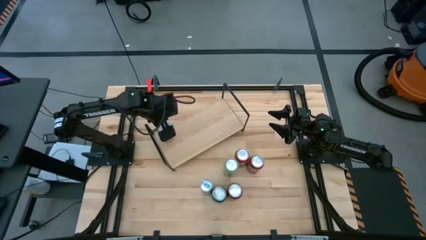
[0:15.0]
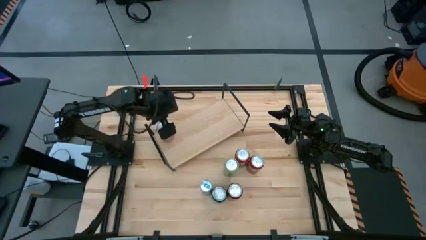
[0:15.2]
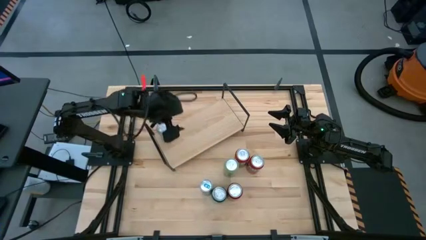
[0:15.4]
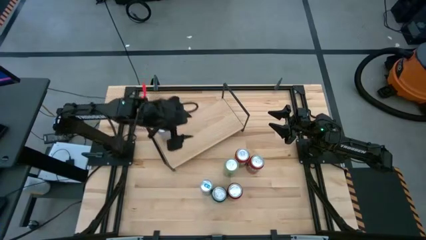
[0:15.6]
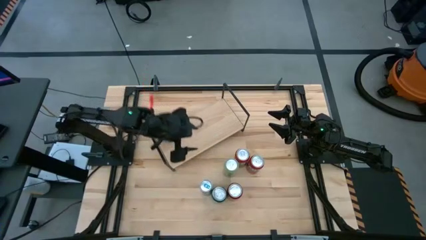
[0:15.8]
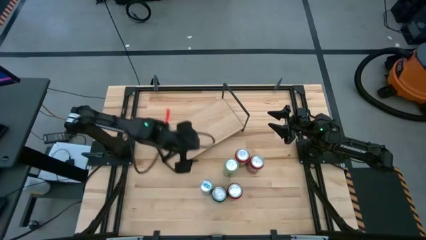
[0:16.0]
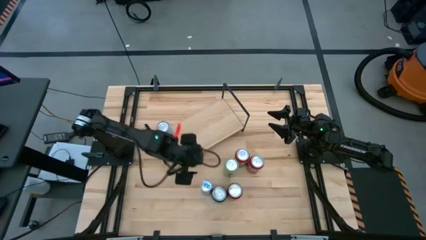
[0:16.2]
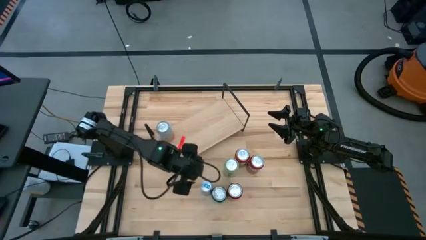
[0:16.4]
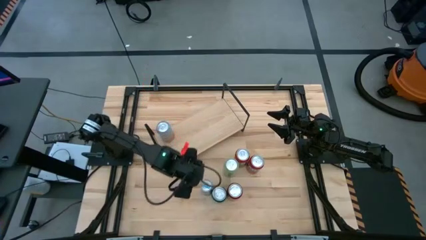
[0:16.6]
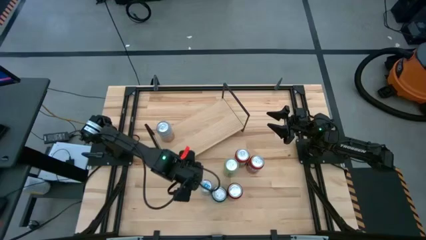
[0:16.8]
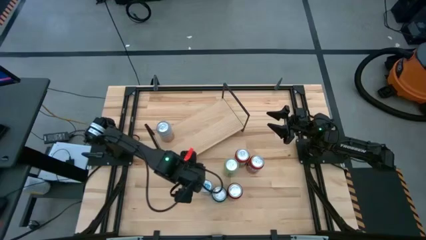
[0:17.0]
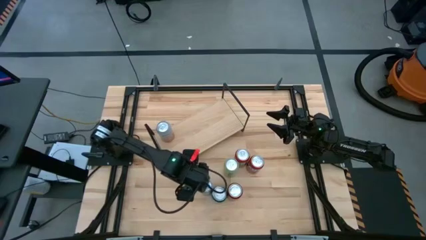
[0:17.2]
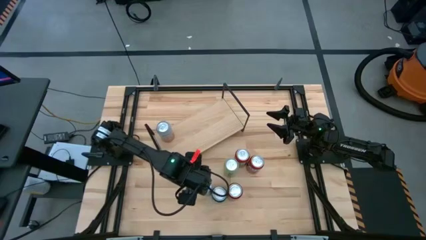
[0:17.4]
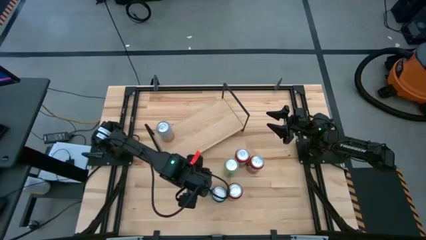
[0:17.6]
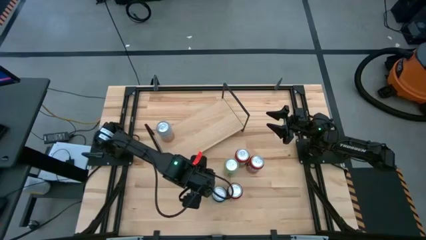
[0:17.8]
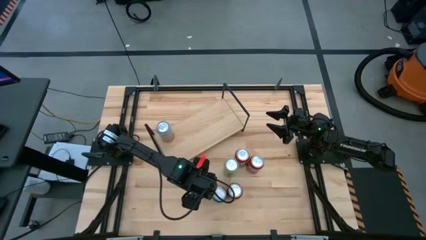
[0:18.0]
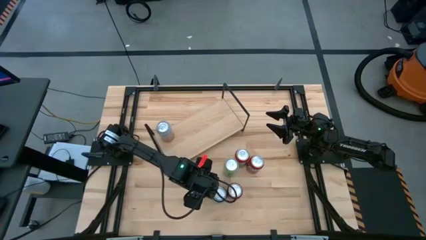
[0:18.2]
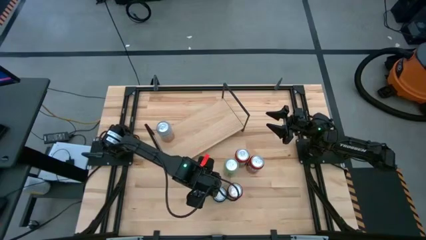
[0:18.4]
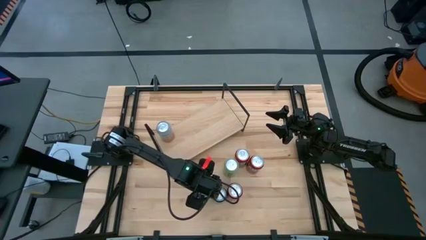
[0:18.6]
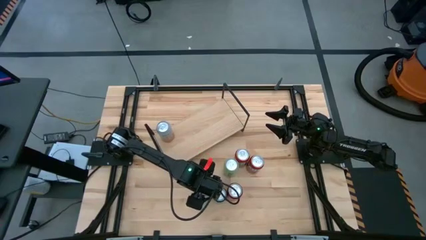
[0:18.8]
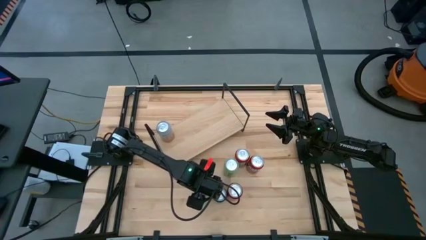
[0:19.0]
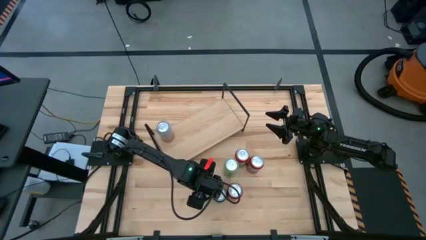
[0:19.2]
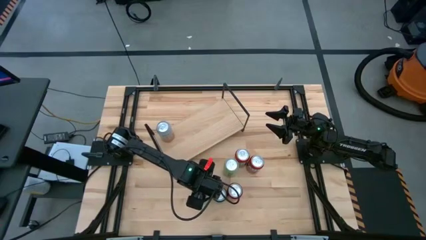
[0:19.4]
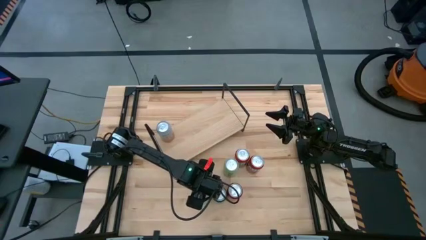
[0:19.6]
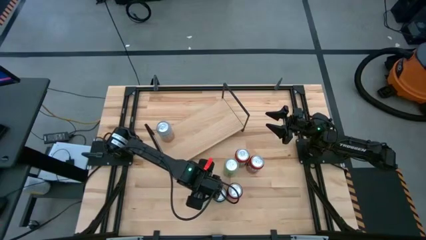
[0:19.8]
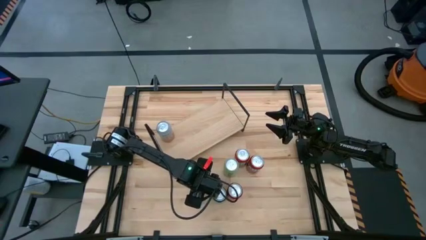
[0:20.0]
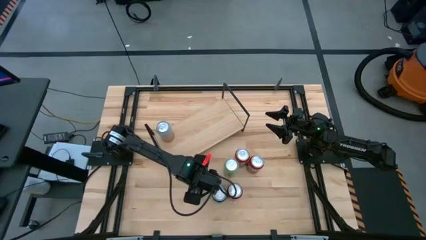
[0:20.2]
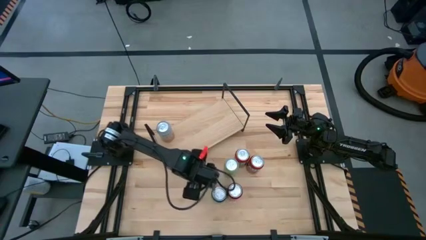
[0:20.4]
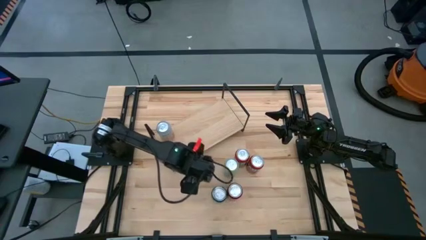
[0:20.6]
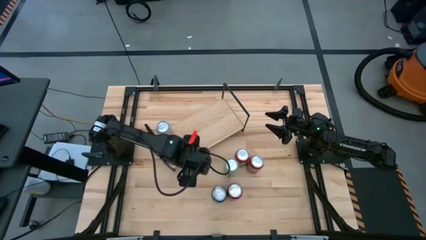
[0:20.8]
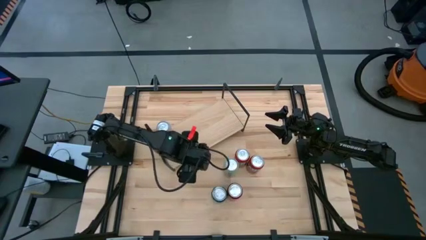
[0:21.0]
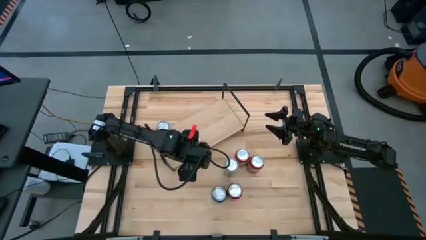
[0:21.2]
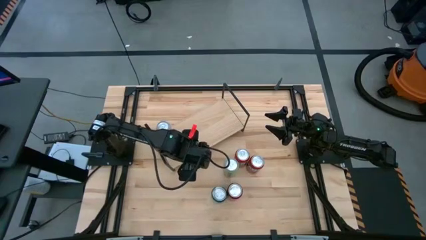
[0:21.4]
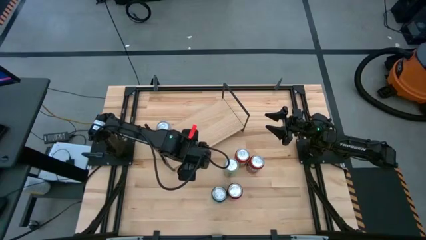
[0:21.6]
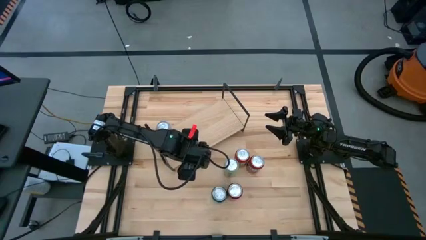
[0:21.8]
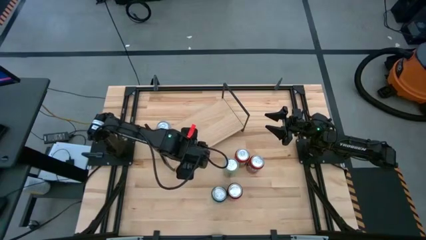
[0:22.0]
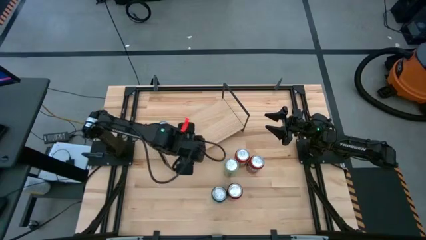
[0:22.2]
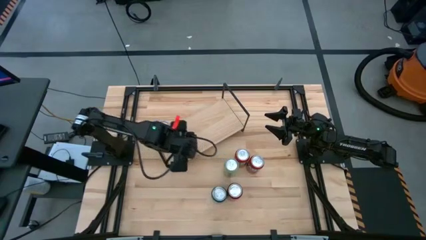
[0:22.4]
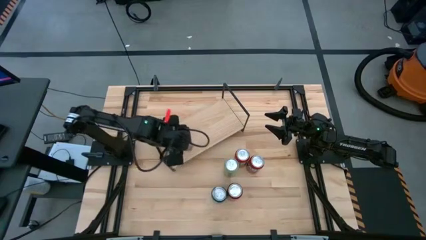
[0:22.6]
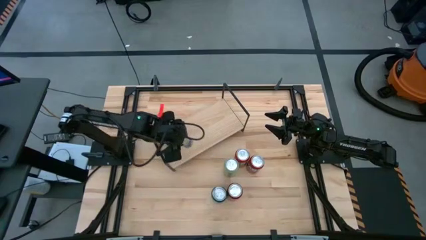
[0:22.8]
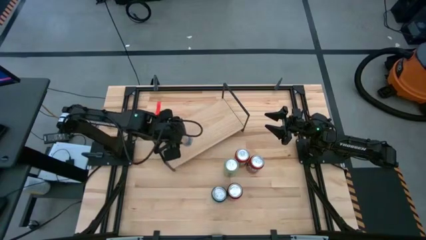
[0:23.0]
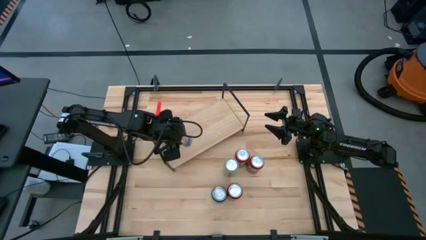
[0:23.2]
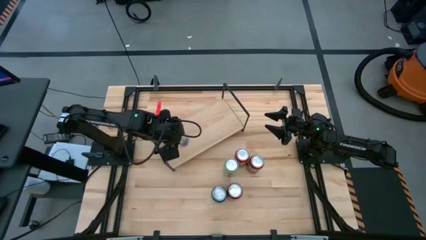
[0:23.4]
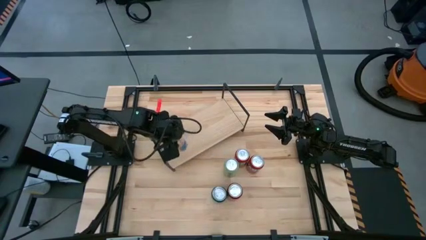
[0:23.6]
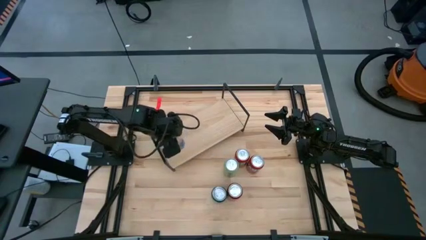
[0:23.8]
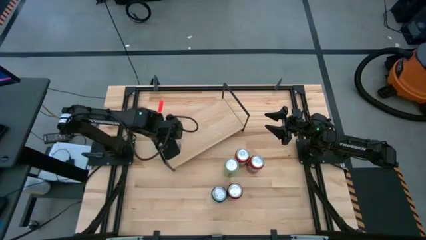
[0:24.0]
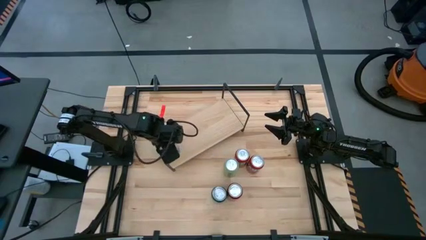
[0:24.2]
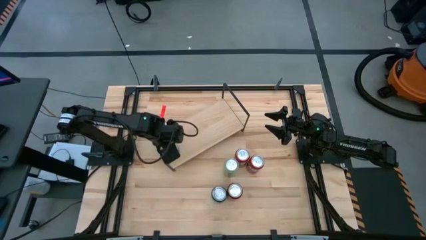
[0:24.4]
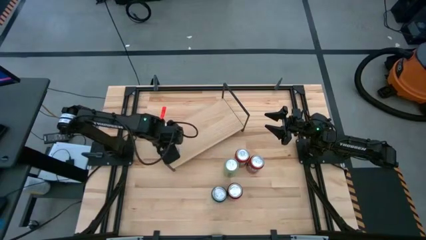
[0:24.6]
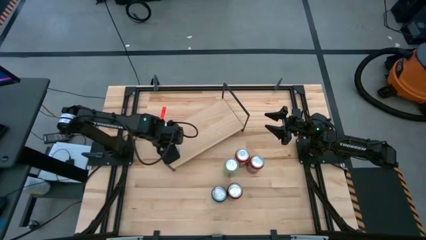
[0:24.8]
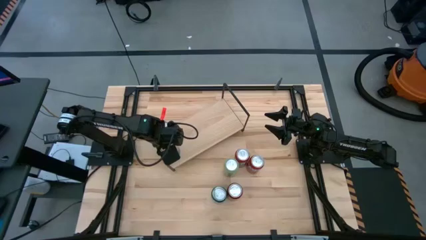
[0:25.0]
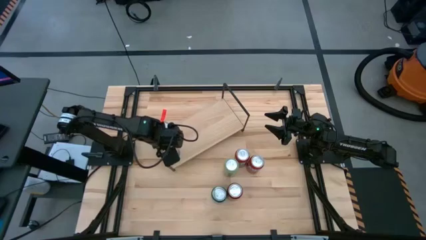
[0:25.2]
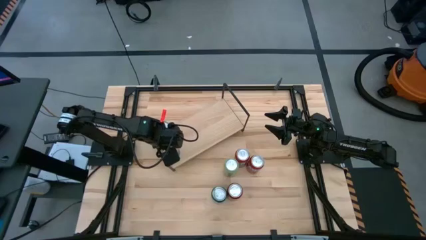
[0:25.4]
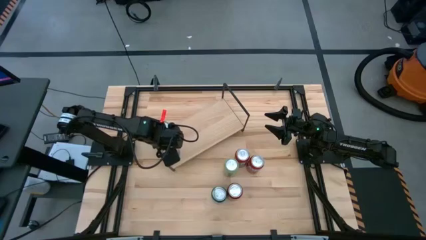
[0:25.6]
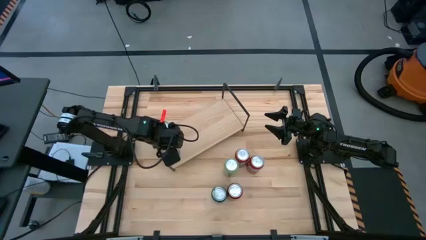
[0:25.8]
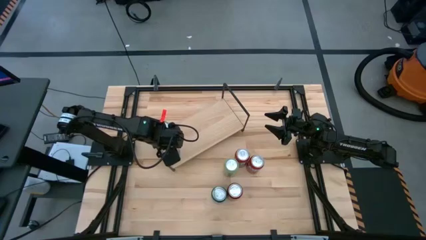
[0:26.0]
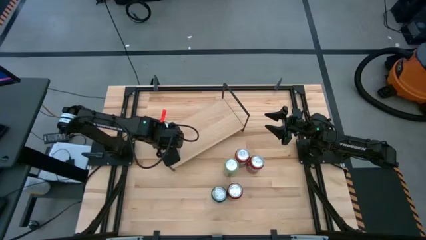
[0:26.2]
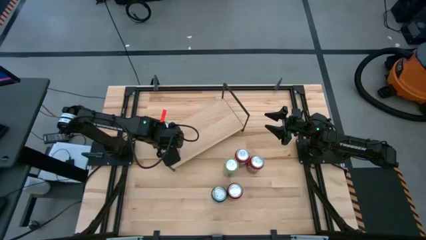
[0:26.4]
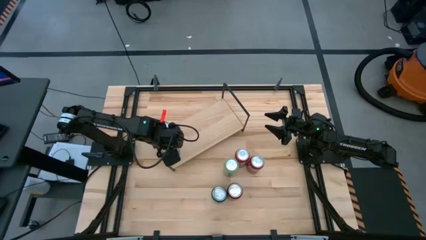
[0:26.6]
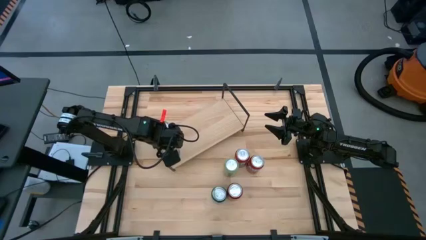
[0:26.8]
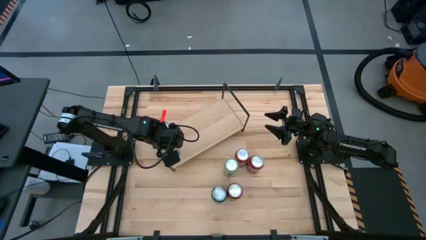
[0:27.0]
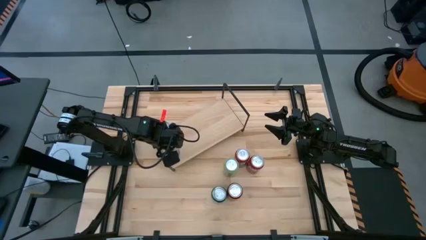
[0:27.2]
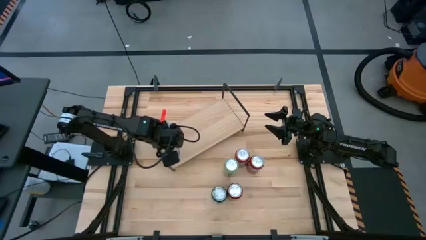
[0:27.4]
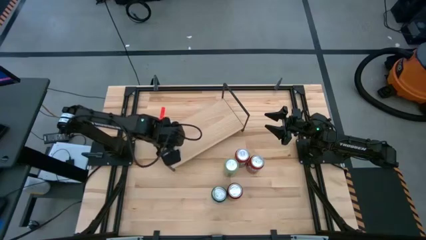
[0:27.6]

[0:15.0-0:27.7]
Task: Place canned beverage on shelf
Put the blue soda can on the shelf
